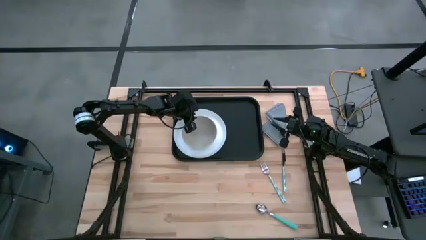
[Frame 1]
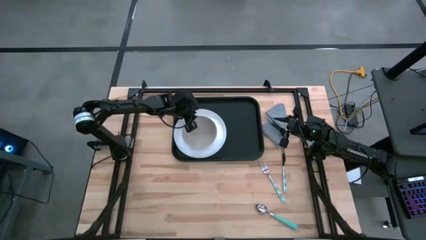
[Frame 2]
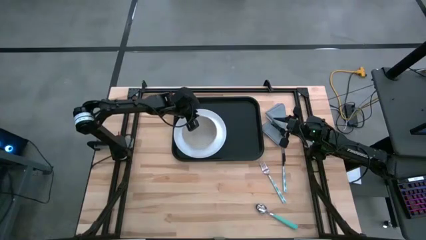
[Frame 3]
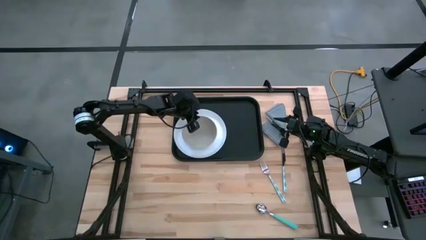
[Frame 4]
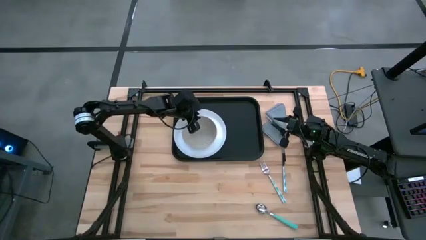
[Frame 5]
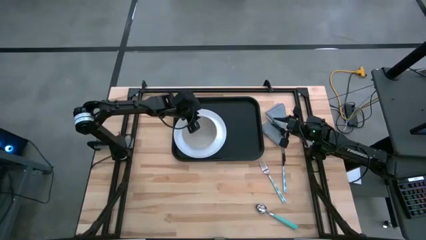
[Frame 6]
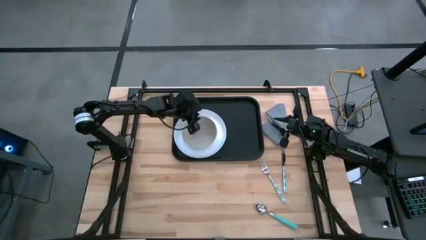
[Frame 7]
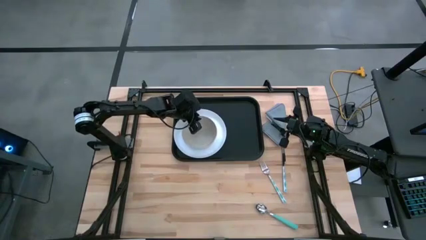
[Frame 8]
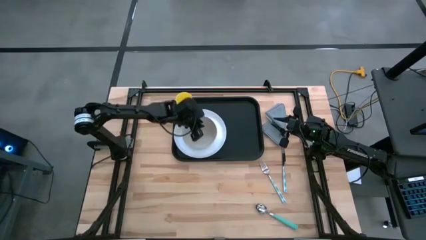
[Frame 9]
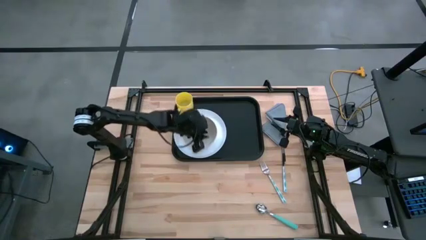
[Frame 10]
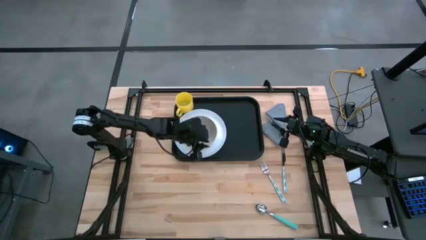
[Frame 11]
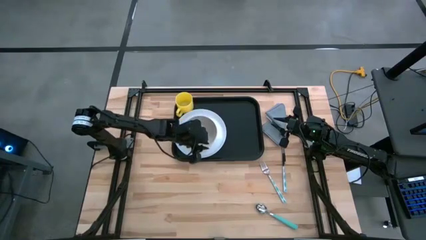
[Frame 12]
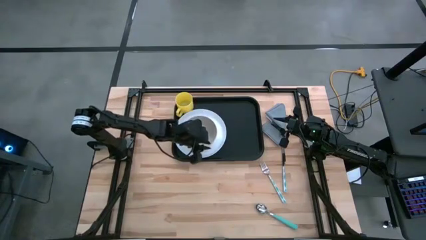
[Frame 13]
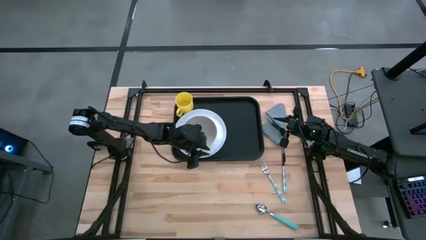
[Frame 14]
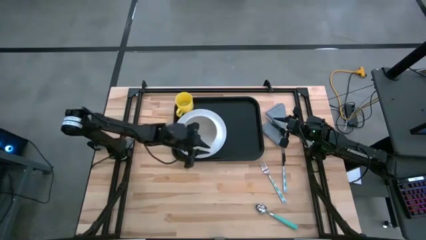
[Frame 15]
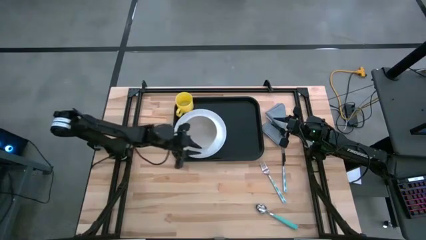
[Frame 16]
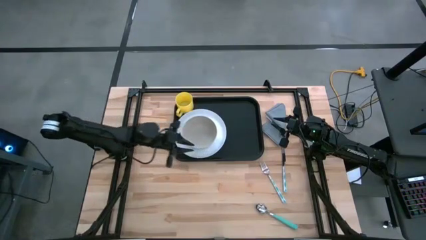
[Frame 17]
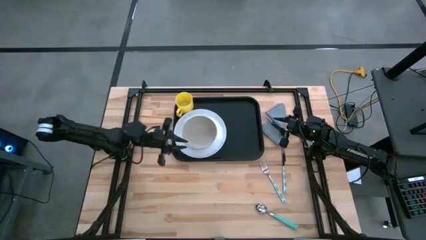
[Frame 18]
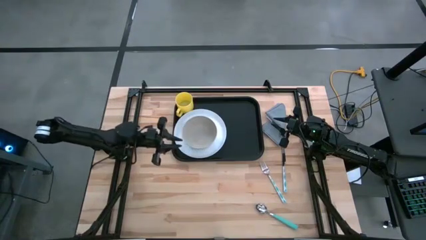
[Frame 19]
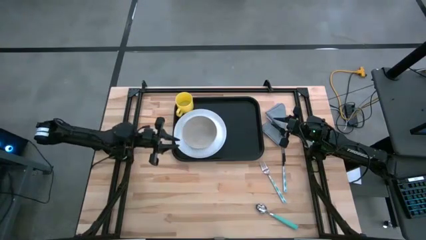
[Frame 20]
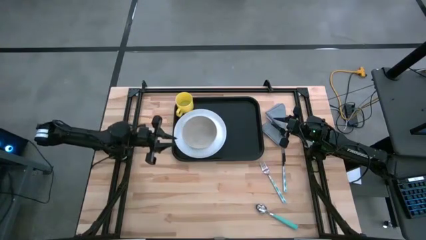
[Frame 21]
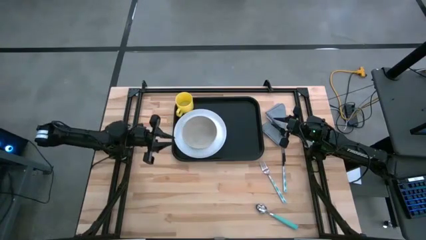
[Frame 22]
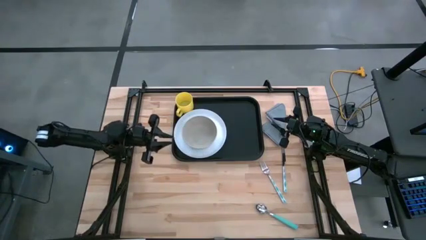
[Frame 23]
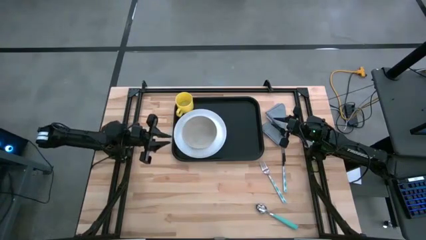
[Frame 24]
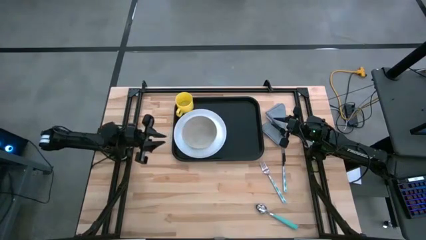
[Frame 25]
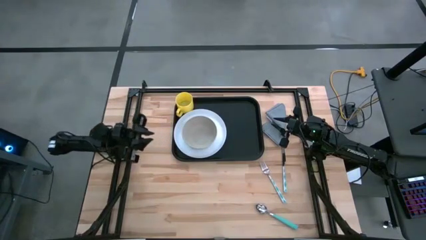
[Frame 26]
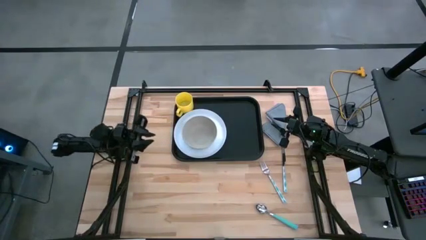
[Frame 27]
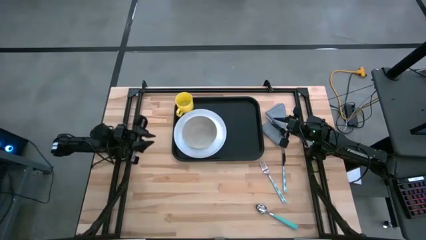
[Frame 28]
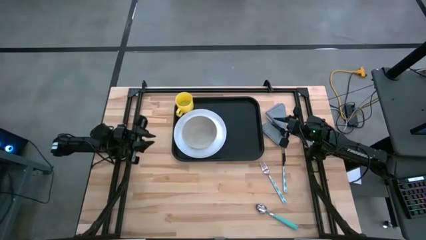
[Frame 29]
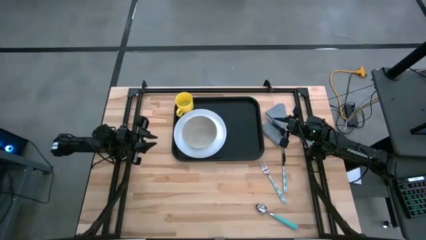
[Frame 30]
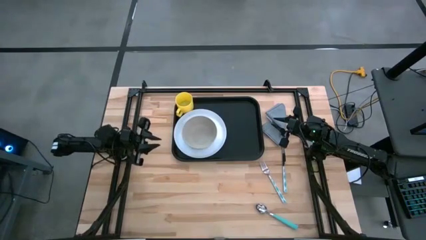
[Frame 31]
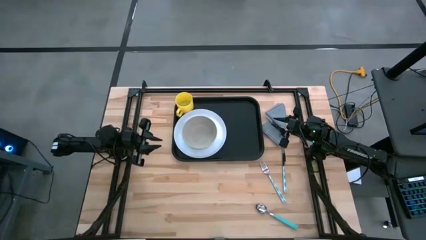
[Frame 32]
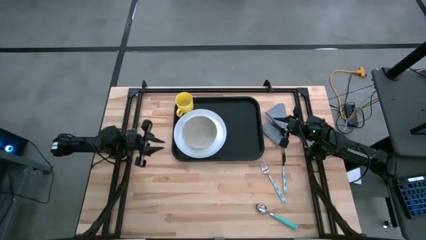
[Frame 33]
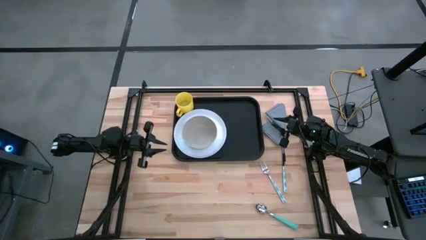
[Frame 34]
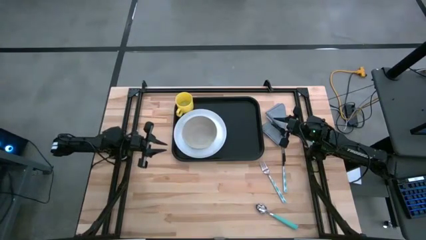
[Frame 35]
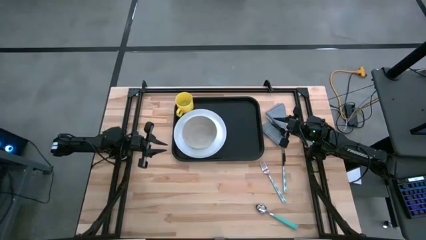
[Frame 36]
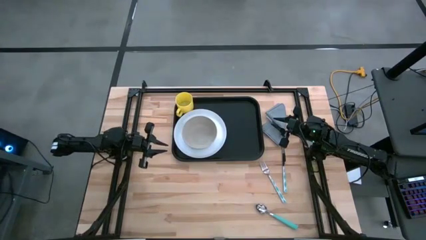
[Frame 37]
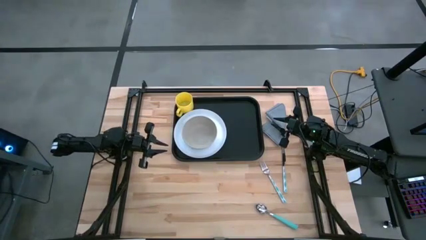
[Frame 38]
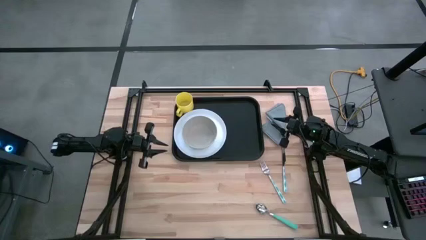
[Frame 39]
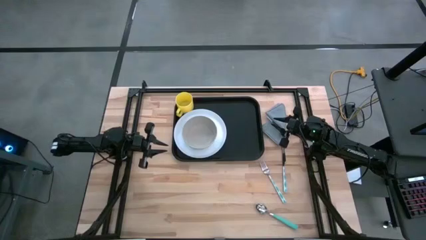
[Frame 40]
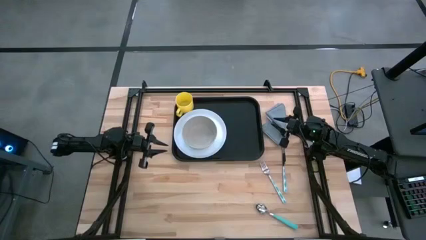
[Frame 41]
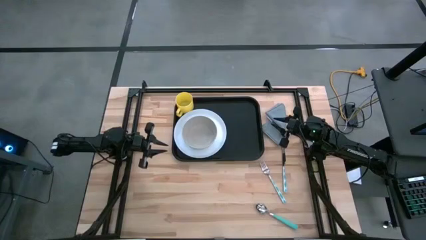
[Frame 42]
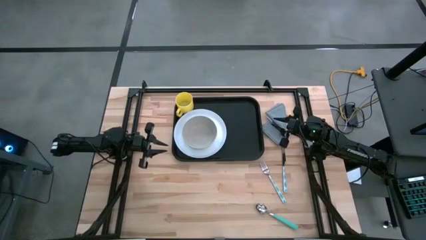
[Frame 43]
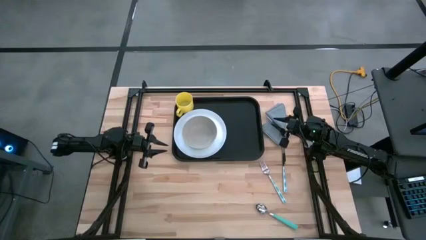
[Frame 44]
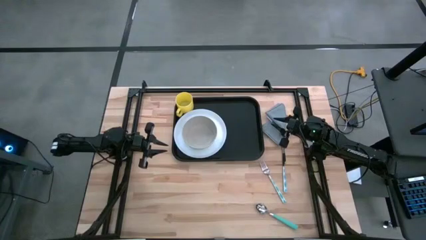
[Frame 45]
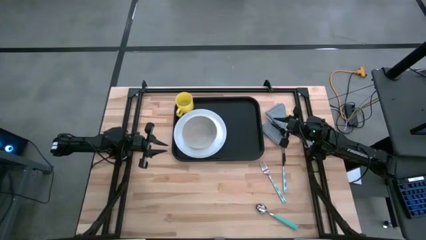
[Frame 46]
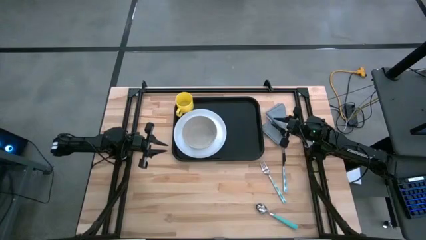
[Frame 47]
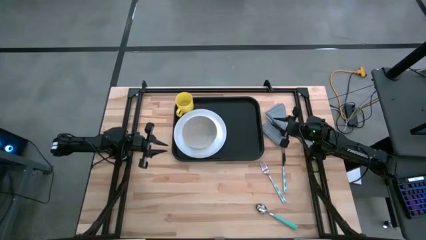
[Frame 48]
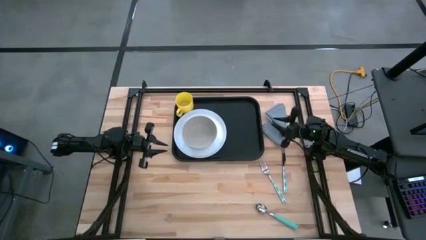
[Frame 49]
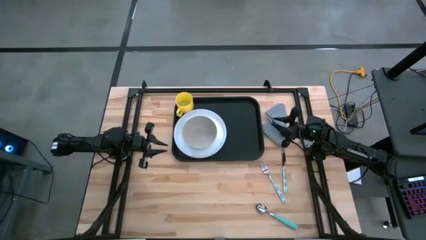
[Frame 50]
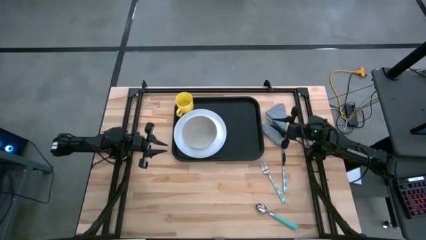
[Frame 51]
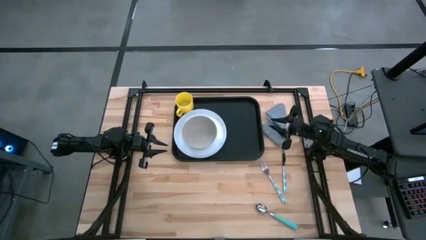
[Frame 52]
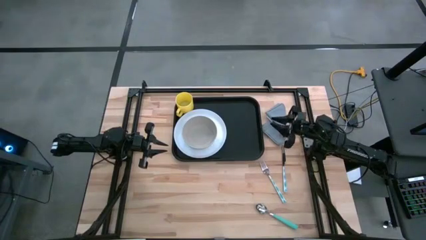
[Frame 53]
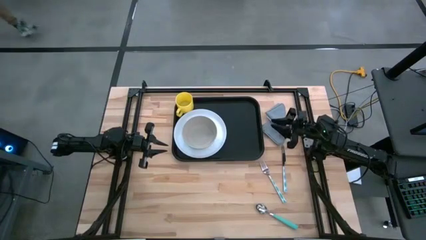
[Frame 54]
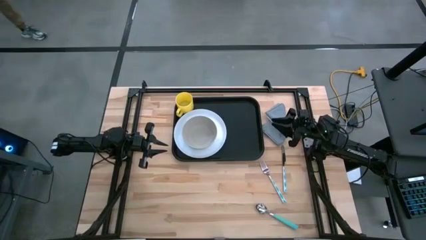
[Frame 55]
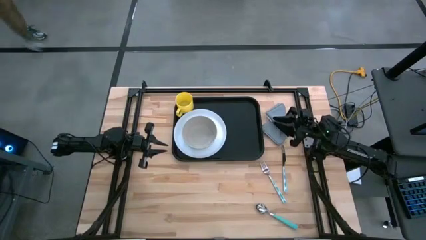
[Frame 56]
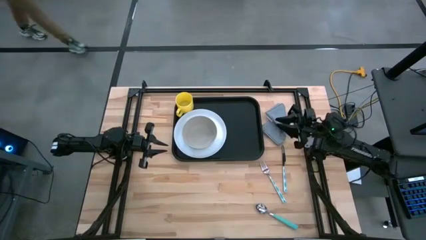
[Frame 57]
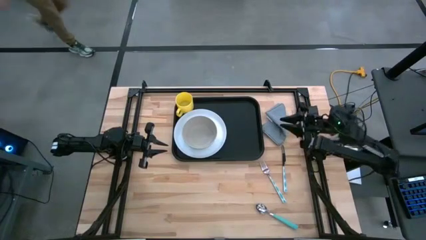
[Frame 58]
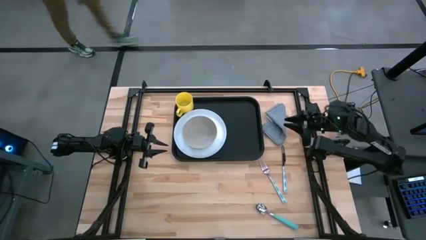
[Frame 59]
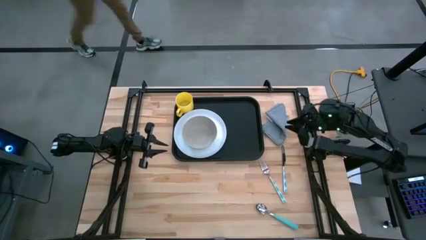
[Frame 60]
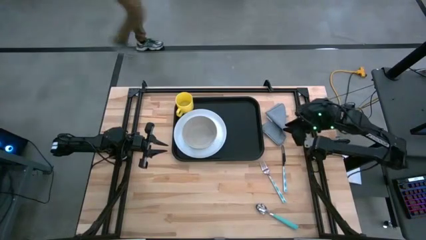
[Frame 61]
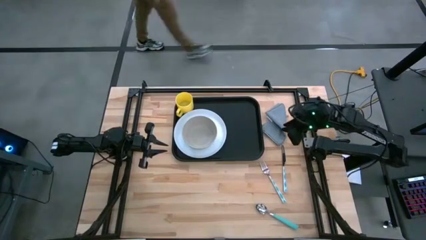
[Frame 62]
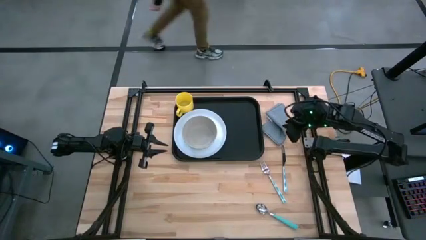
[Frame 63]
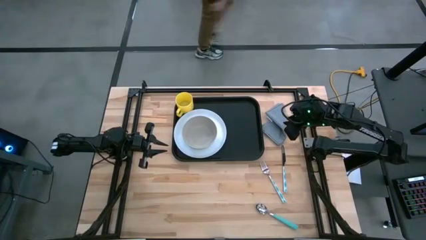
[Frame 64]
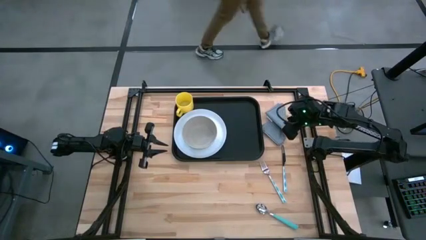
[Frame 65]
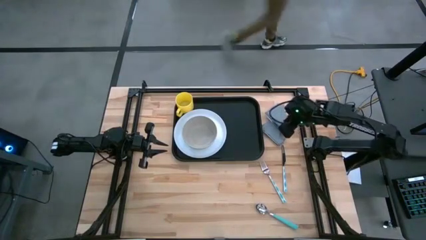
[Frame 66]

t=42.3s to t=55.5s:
Task: Set up tray
Put the gray napkin on the black serving tray to the right of the white plate

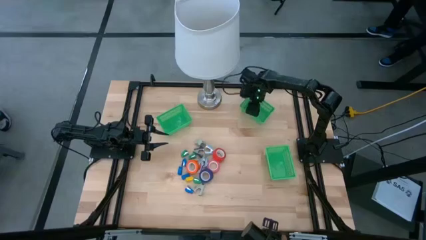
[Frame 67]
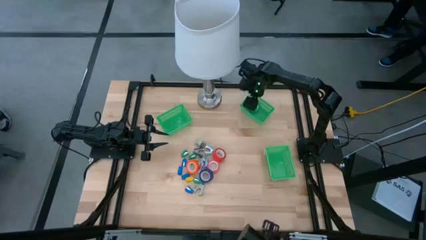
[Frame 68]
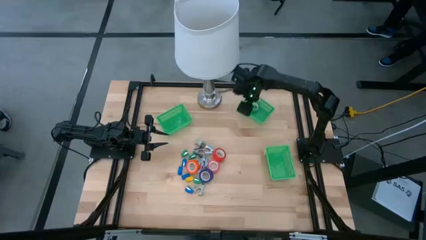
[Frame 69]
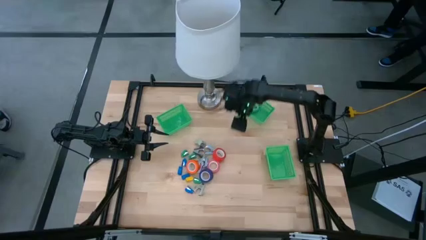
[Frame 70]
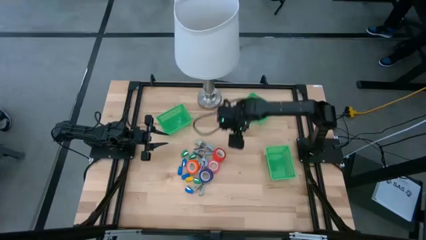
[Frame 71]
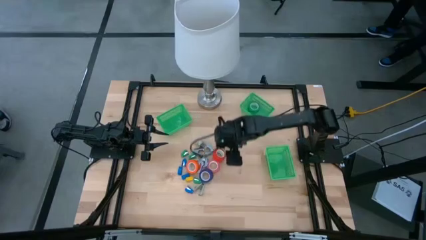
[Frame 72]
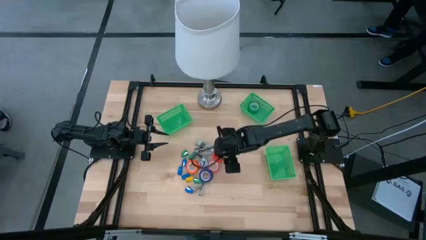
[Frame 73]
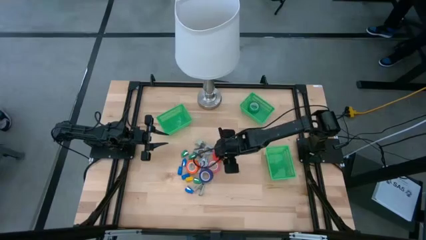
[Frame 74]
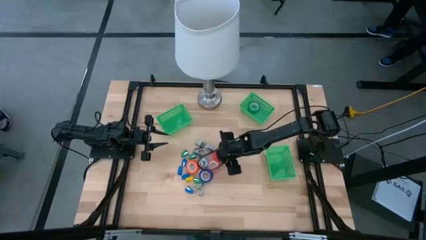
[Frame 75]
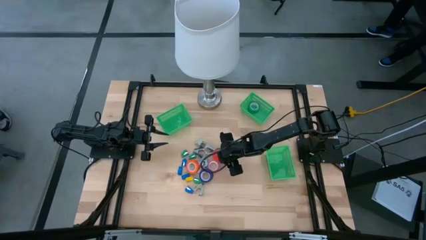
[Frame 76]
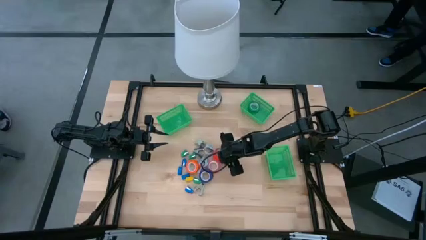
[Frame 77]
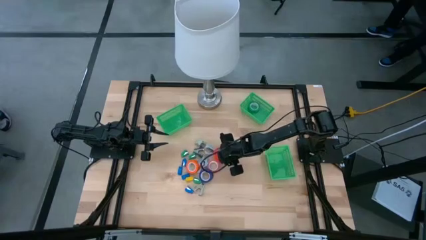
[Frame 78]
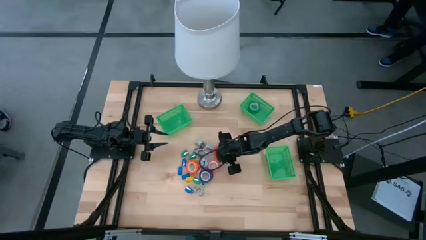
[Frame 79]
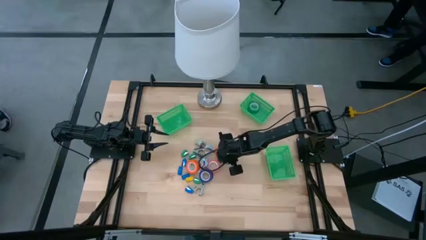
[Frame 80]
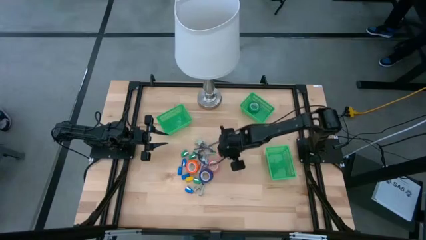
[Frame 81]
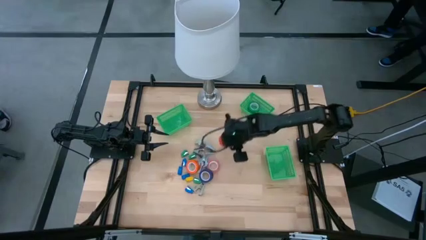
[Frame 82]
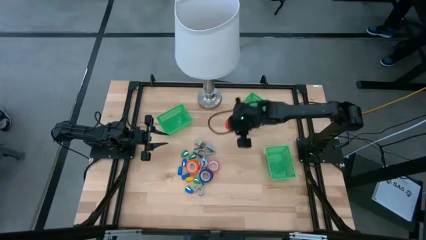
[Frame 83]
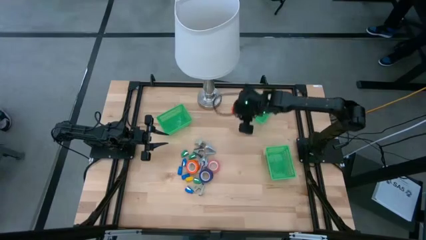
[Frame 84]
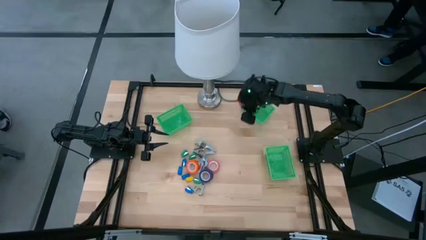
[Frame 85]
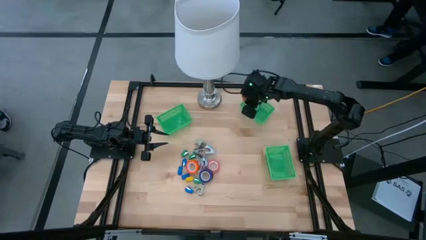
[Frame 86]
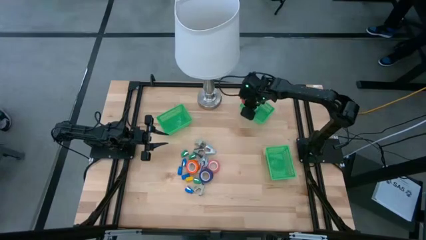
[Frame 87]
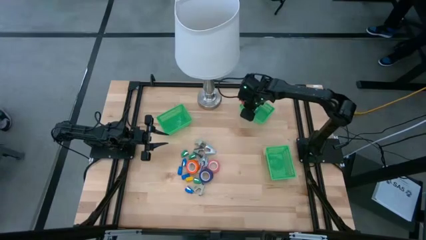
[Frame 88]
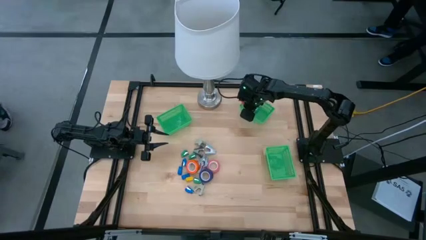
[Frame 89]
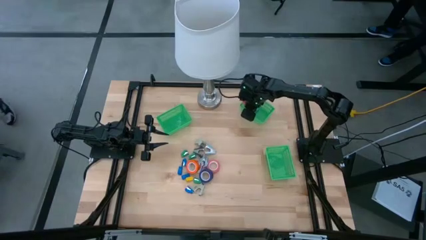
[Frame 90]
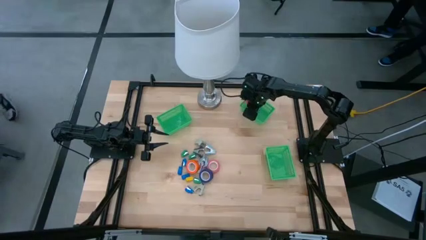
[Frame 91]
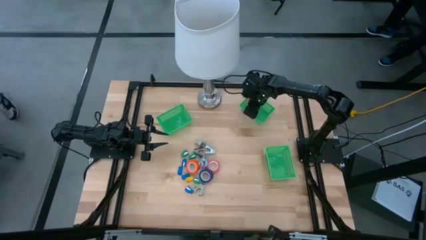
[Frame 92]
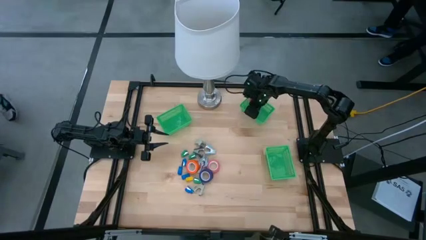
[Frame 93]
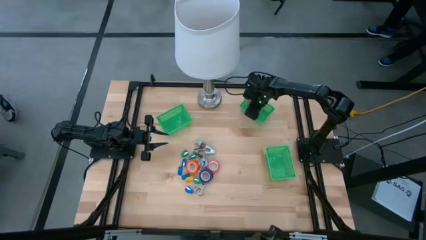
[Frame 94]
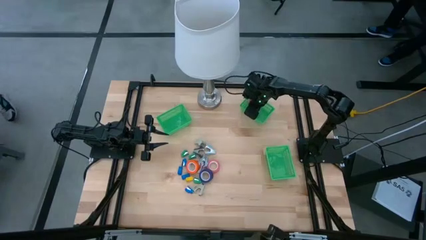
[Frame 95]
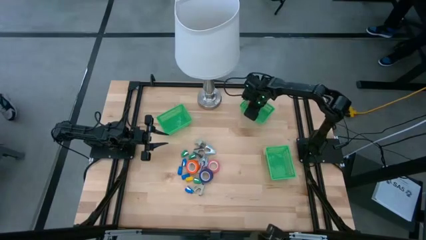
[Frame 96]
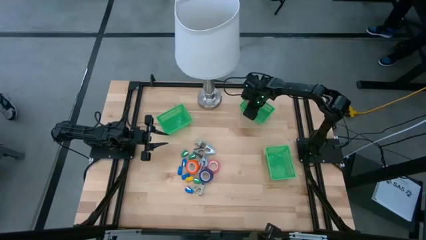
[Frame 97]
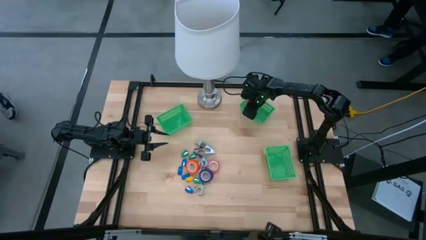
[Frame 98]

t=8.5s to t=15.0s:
Task: Pick and place Stapler, Stapler remover, tape
Put the red tape into the top right green bin
